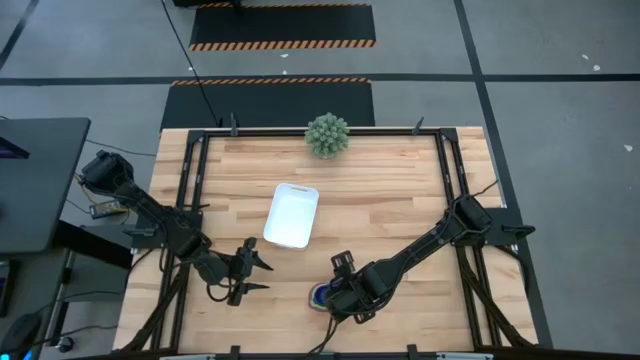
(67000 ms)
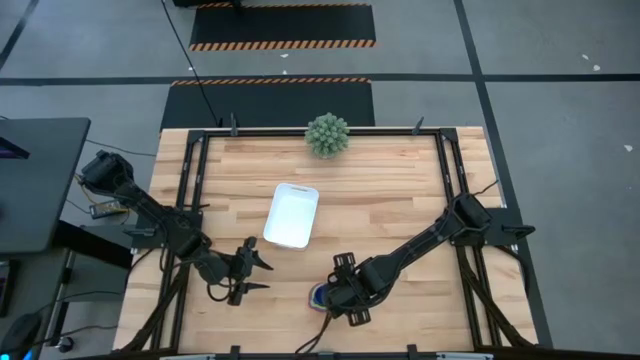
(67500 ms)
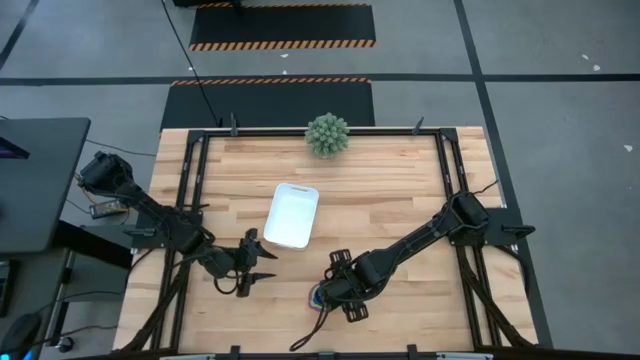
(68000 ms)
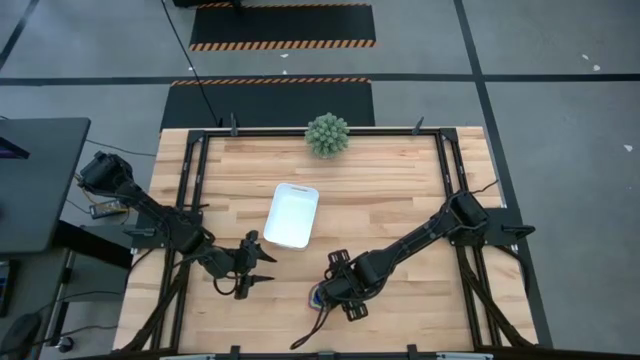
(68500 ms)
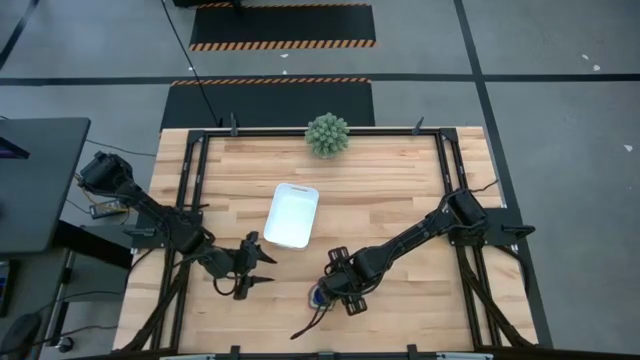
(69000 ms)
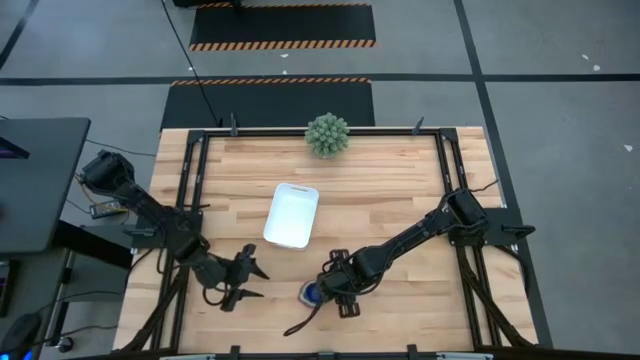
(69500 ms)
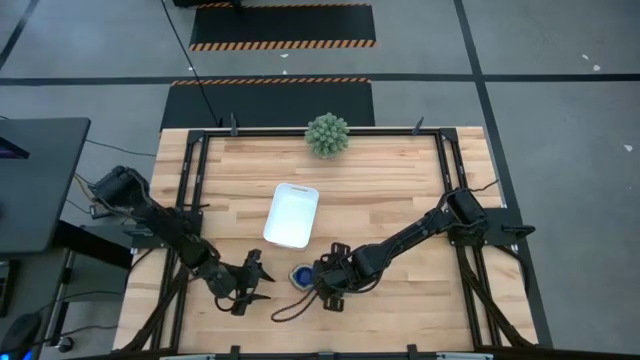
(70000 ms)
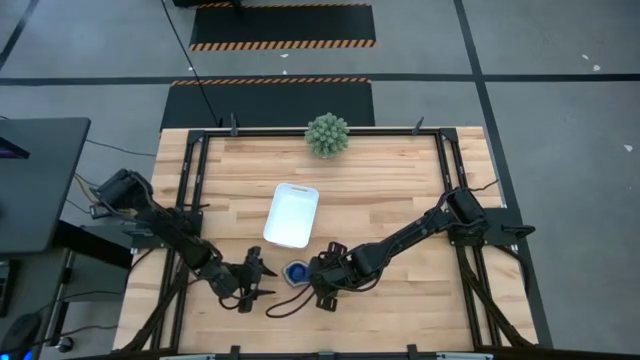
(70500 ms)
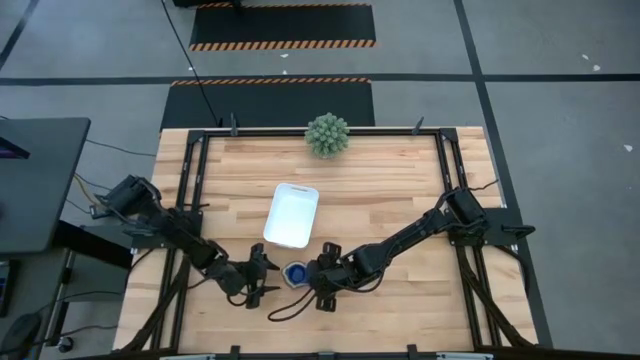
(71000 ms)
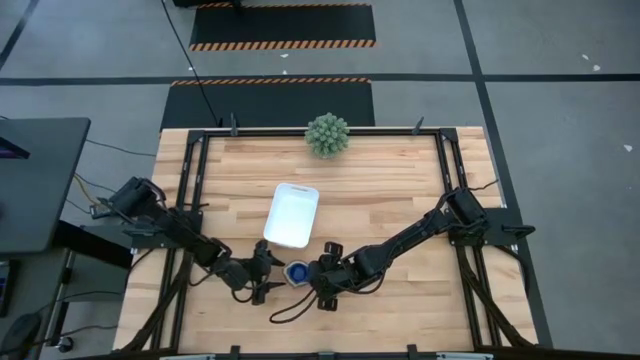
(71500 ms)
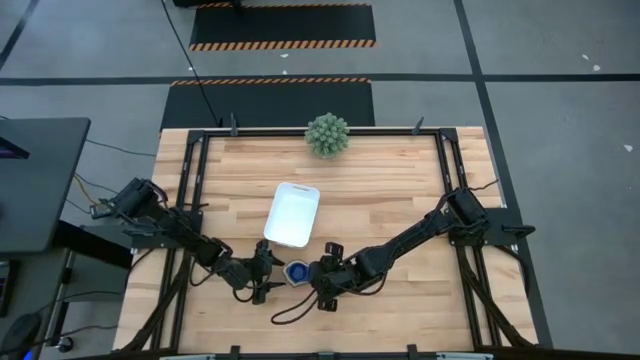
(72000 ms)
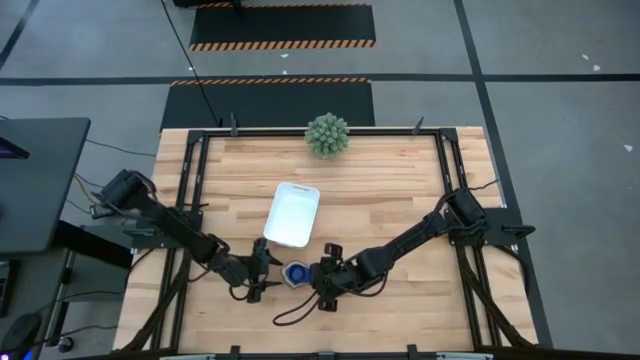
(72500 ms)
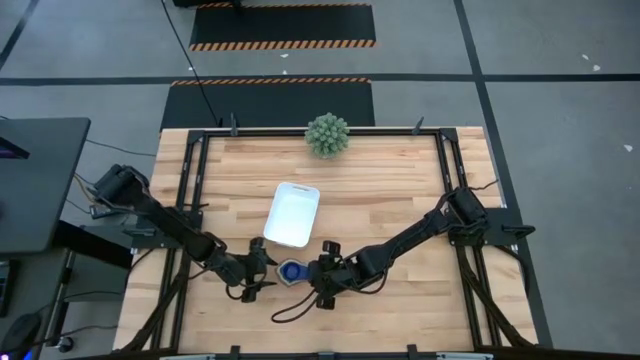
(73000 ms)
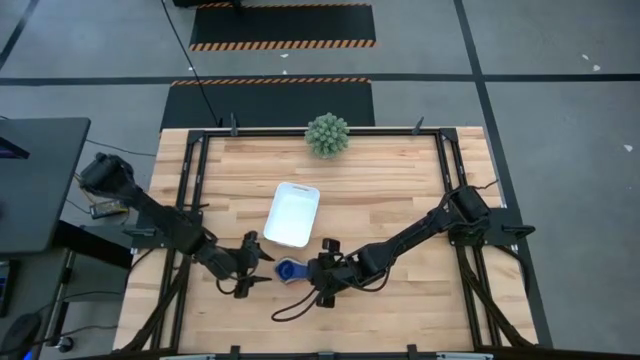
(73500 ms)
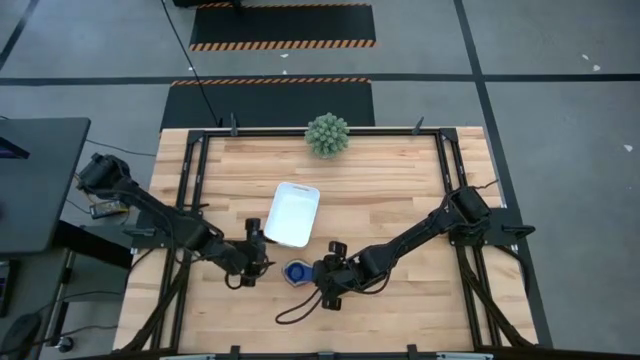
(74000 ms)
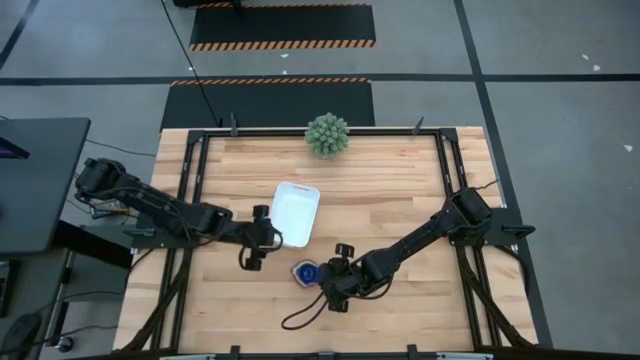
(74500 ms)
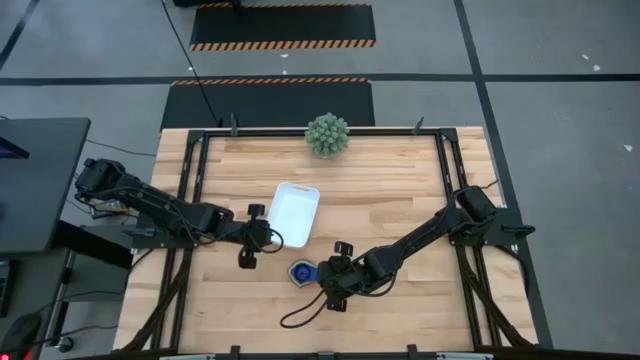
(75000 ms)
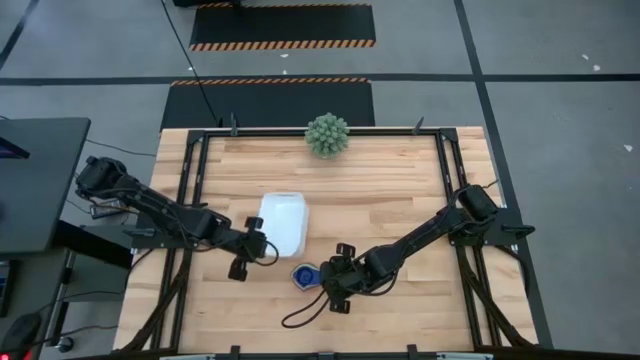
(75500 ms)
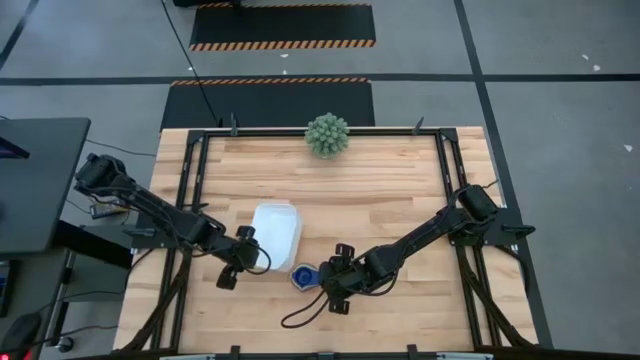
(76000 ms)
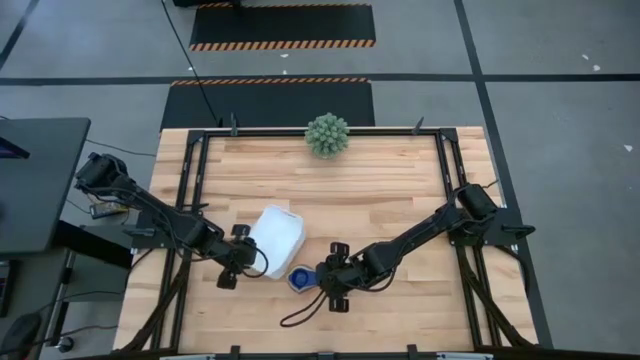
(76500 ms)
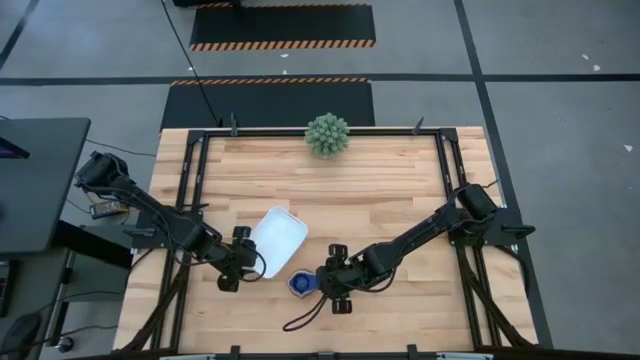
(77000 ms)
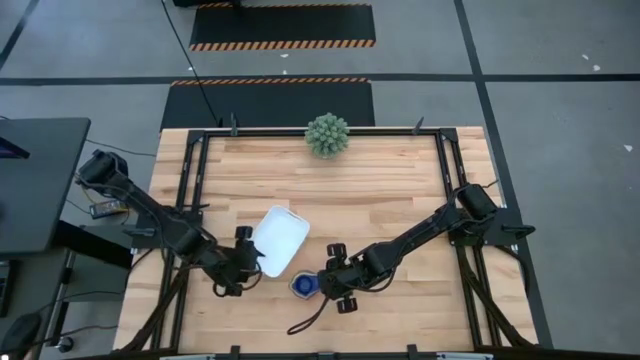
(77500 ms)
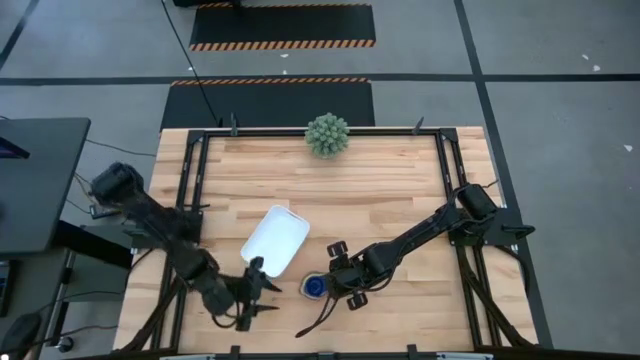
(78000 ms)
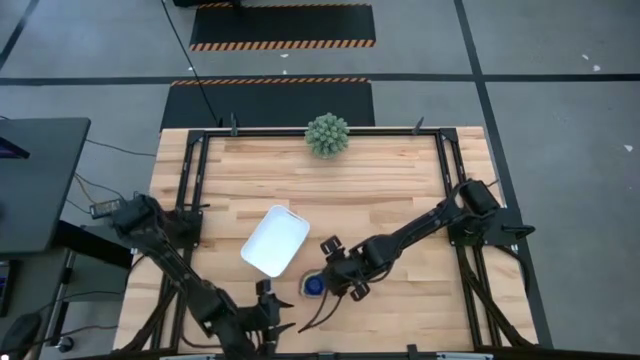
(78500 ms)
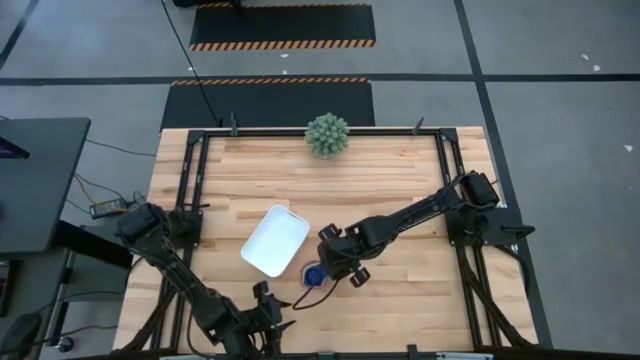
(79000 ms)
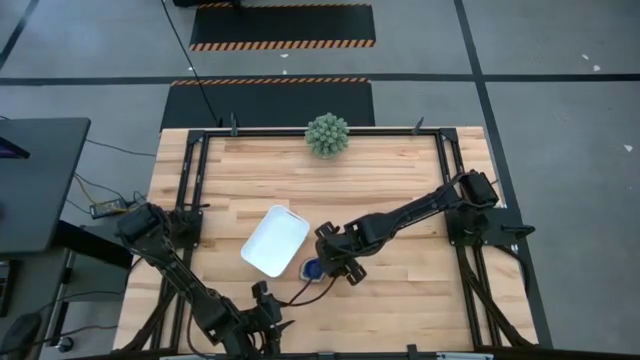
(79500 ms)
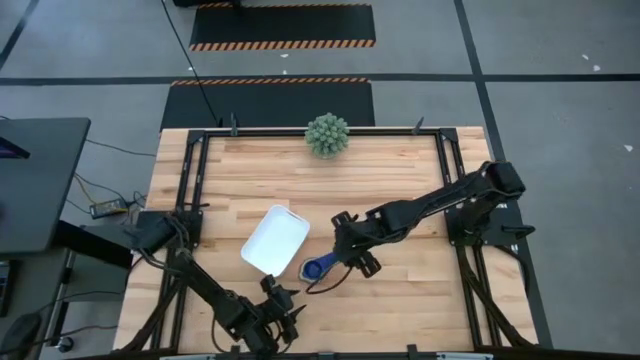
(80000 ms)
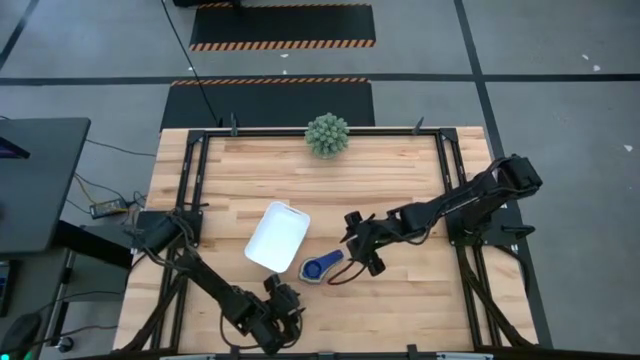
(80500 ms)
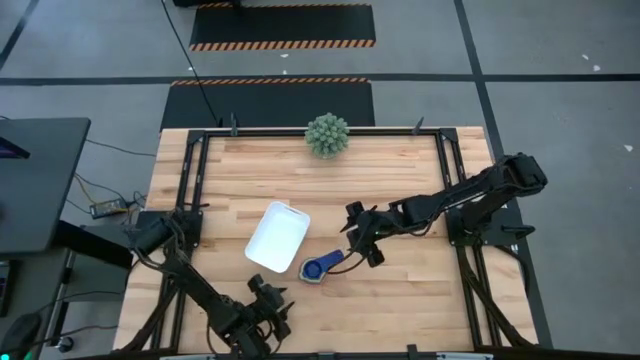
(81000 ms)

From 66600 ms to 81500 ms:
Task: Nest measuring cups in basket
Put the nested measuring cup into the white bin

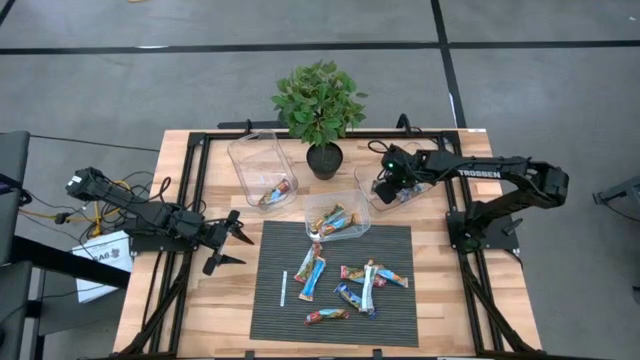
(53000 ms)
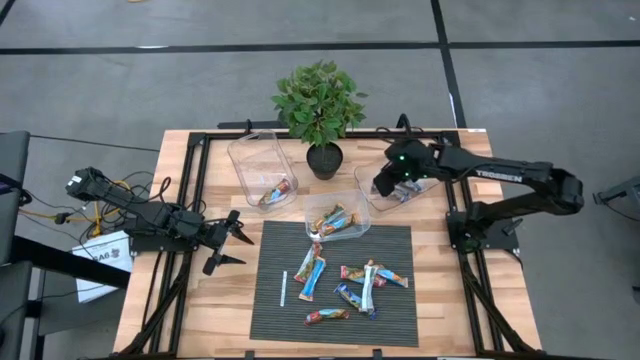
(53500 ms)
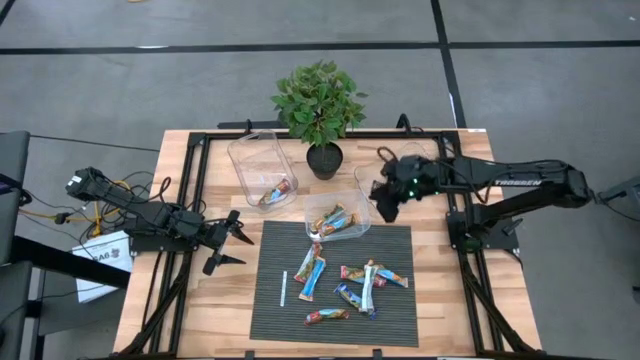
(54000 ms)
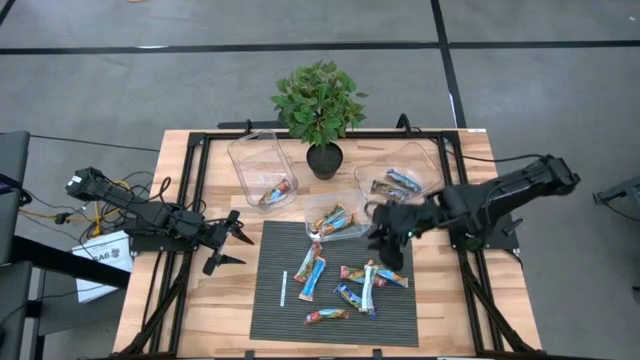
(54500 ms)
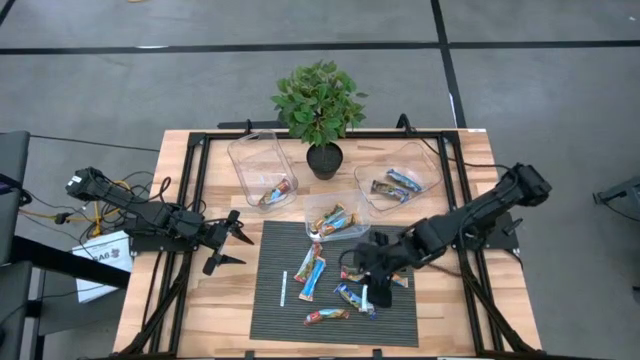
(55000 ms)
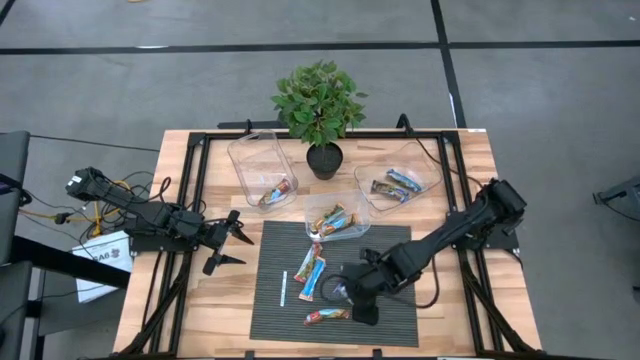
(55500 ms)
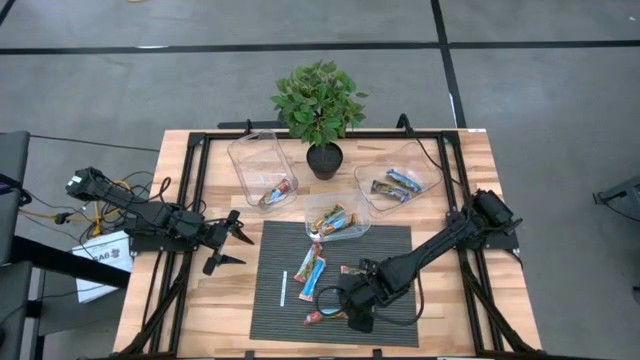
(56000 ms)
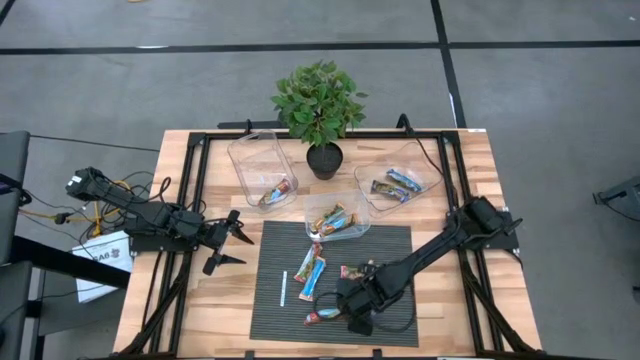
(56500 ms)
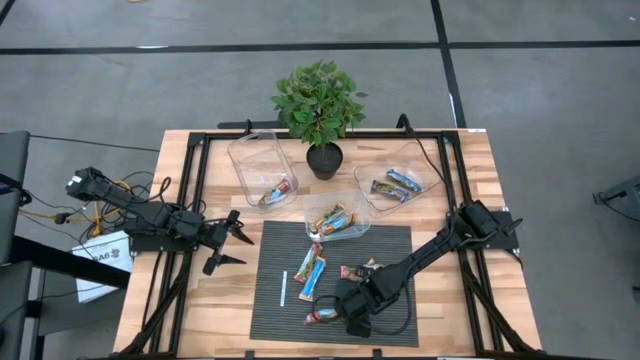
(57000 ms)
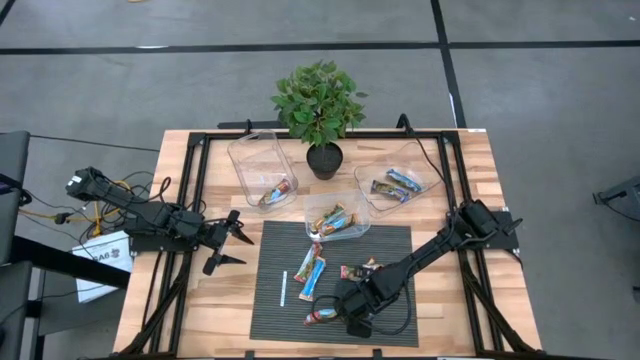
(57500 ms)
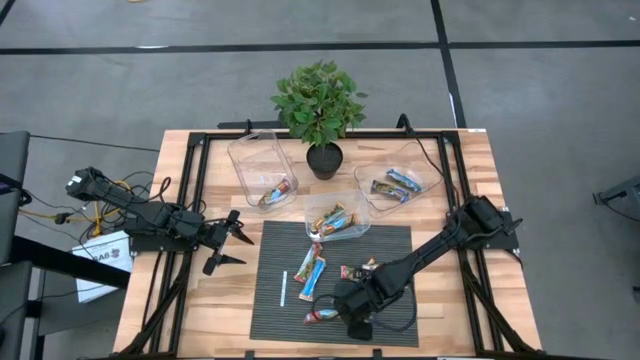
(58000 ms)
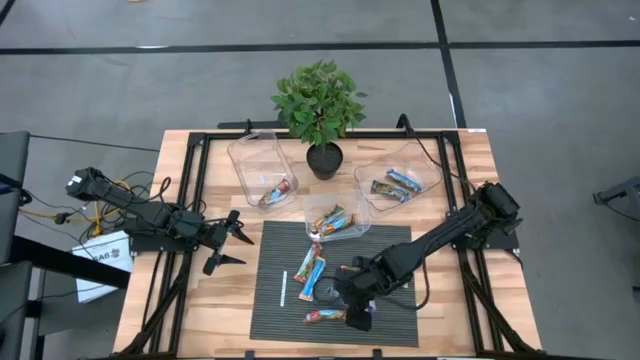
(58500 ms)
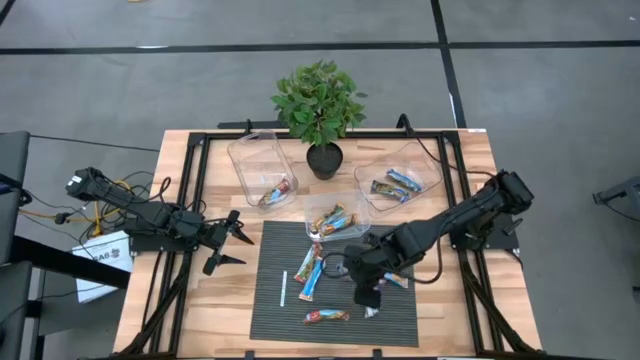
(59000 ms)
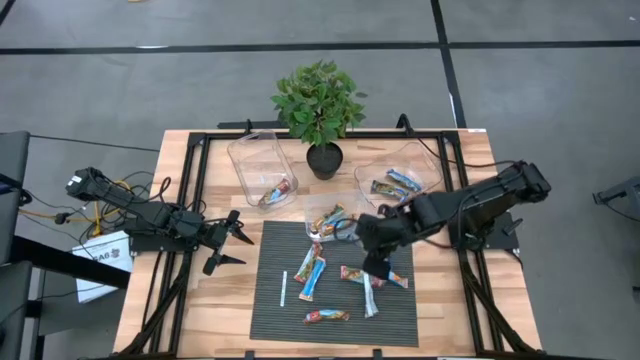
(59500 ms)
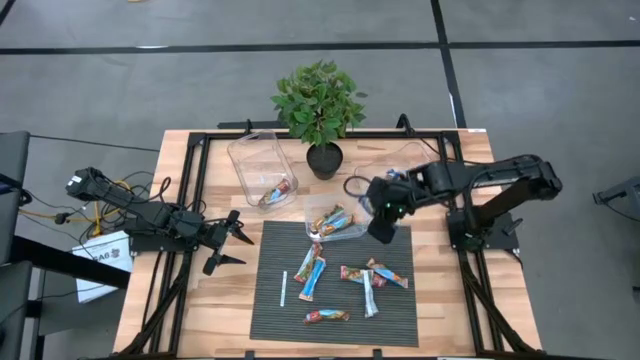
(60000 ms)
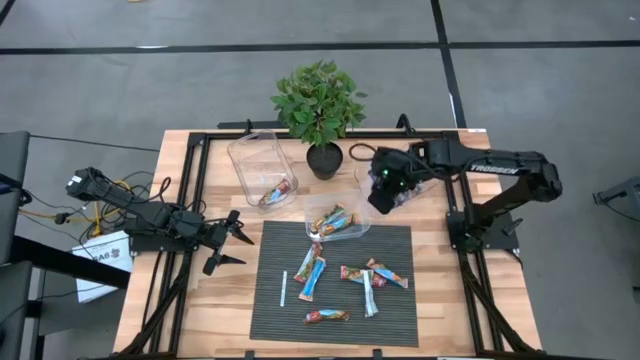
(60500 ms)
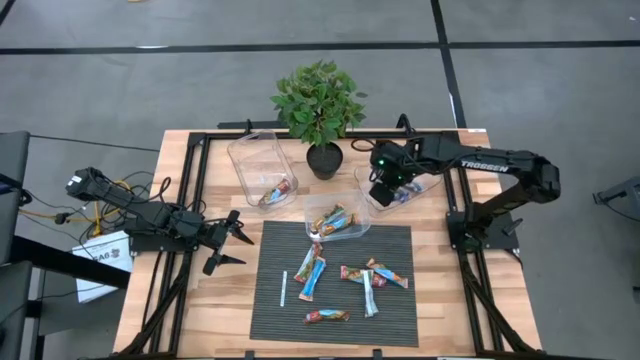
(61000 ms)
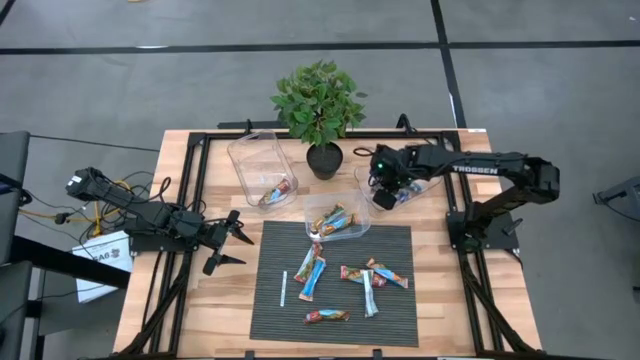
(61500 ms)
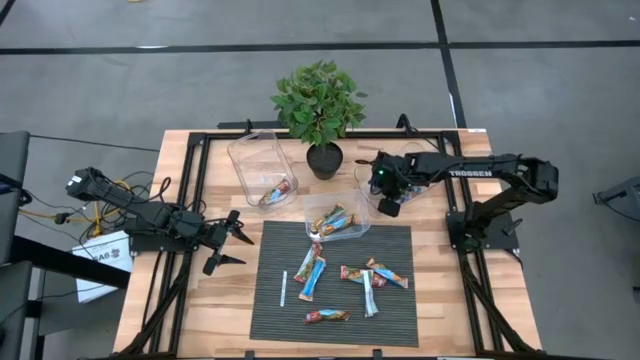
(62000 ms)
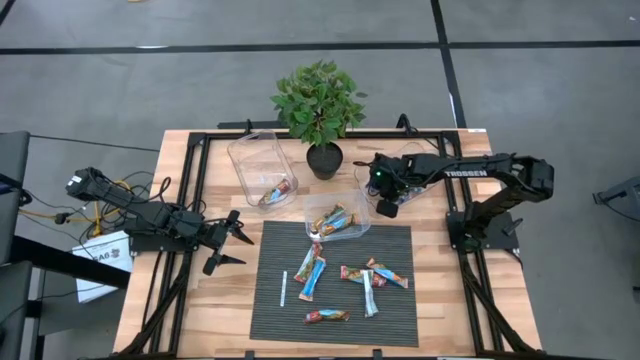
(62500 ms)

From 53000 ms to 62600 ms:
Task: Pick and place Granola Bars by type
Put the violet granola bar into the right transparent bin
